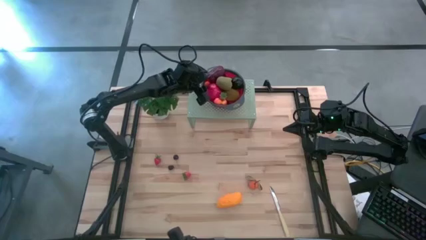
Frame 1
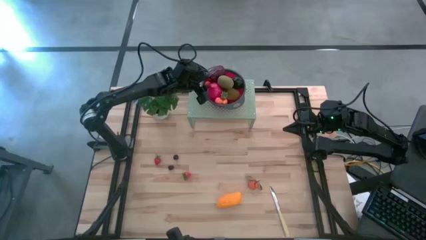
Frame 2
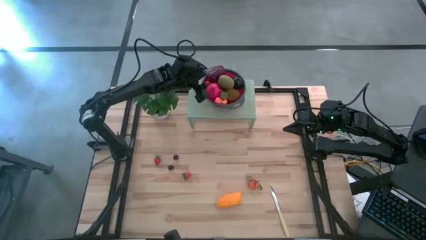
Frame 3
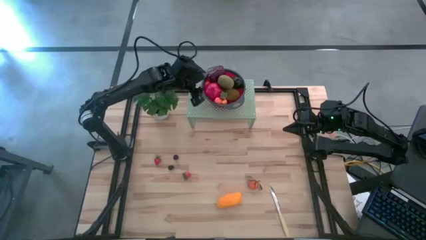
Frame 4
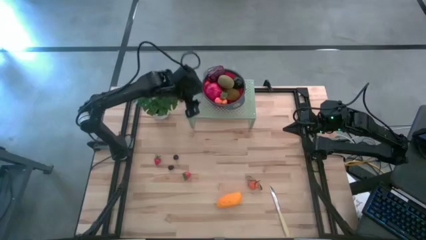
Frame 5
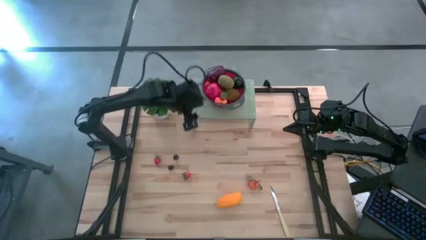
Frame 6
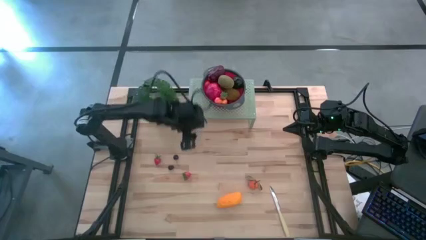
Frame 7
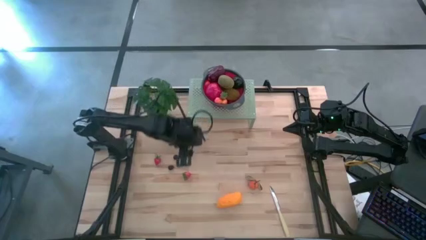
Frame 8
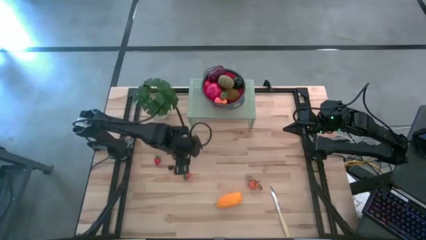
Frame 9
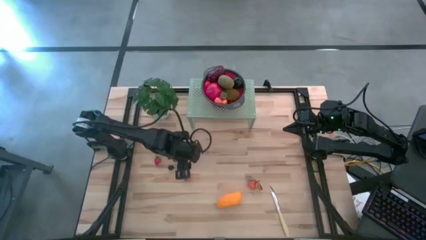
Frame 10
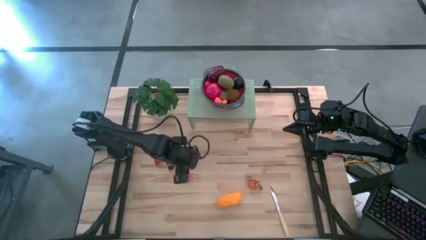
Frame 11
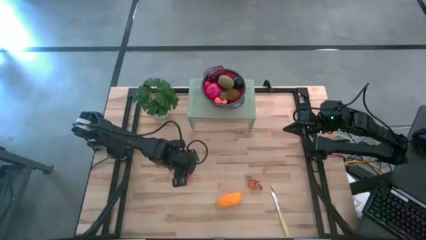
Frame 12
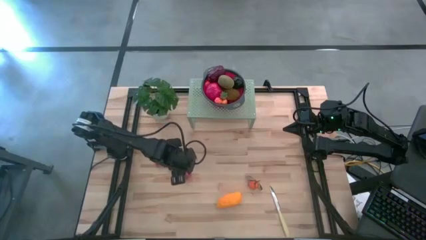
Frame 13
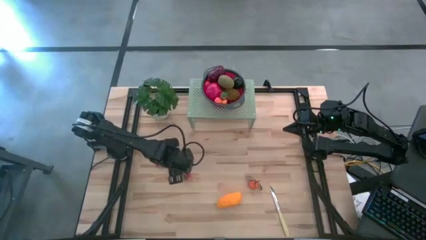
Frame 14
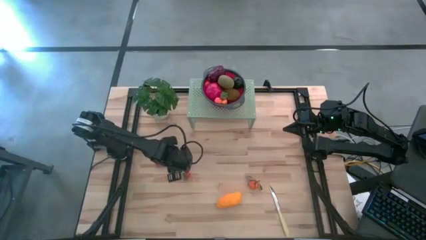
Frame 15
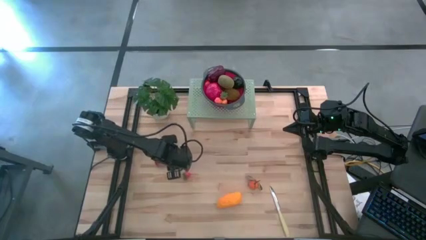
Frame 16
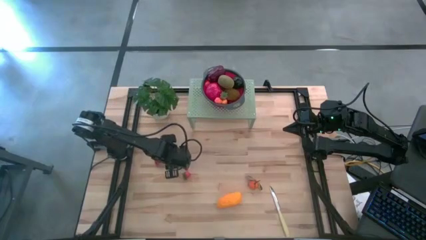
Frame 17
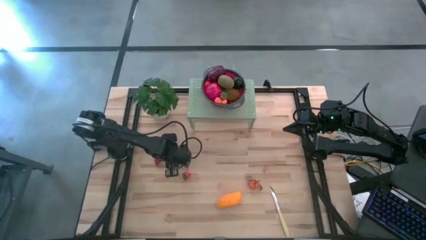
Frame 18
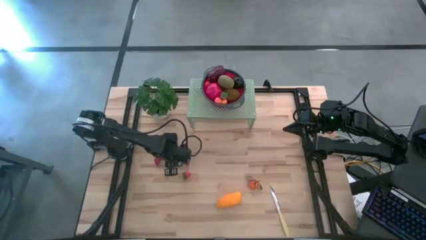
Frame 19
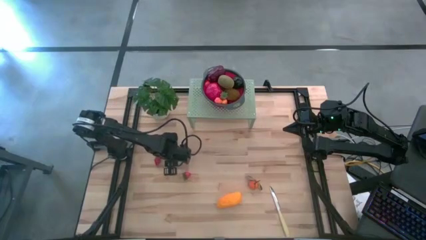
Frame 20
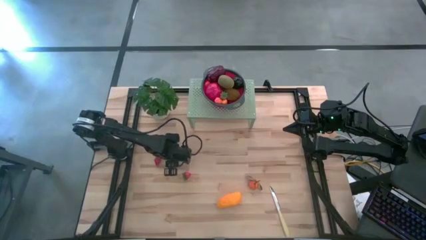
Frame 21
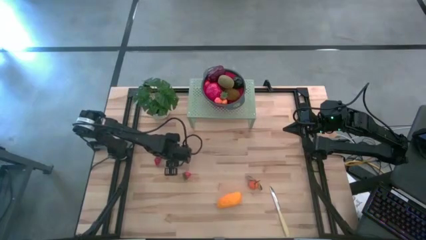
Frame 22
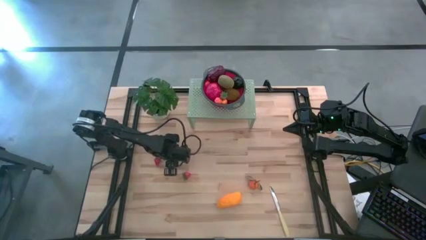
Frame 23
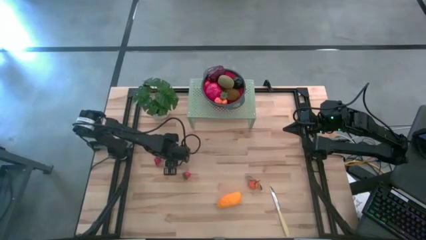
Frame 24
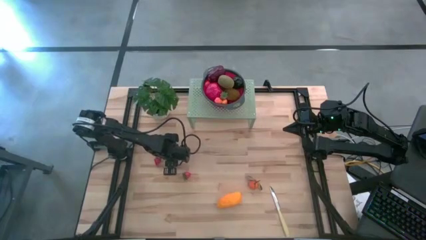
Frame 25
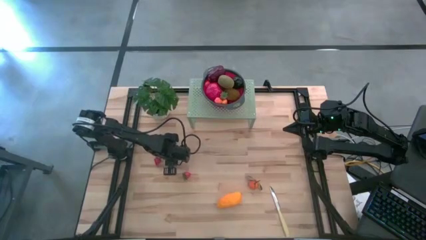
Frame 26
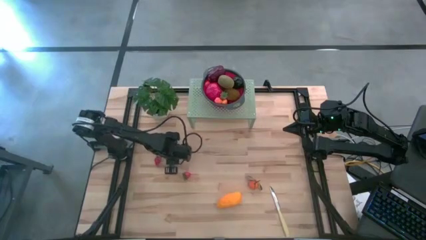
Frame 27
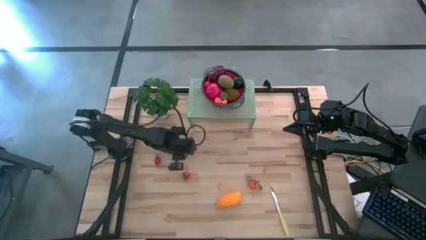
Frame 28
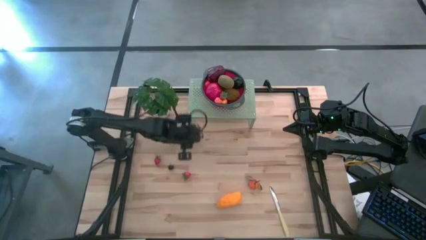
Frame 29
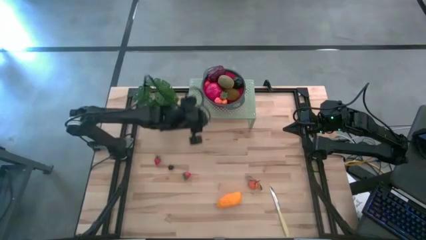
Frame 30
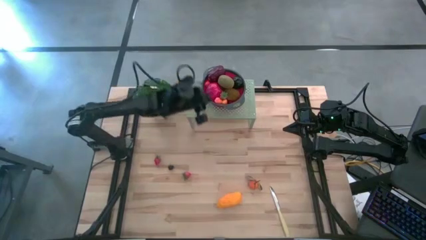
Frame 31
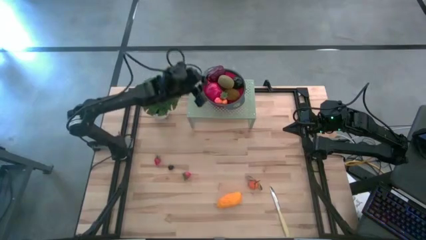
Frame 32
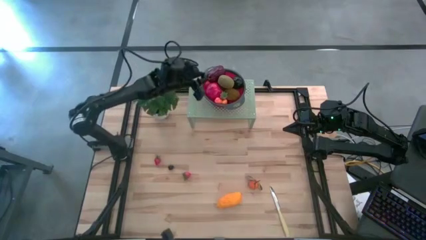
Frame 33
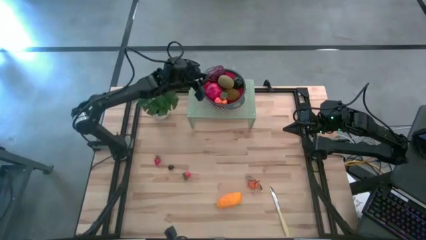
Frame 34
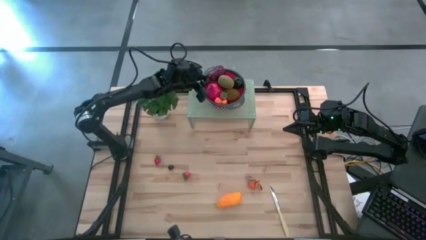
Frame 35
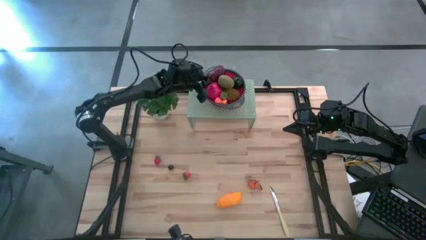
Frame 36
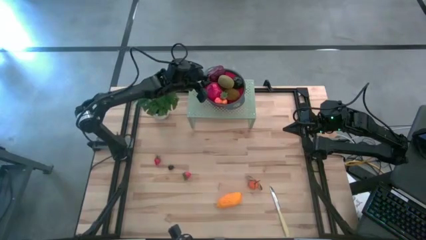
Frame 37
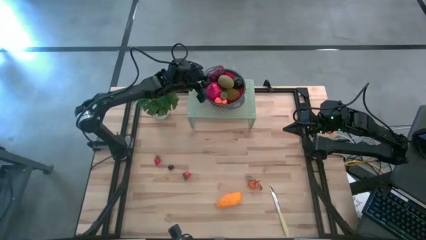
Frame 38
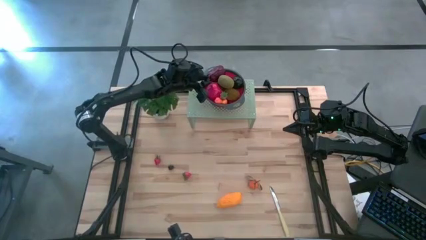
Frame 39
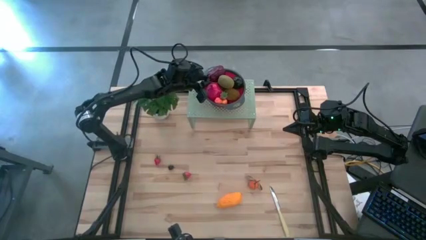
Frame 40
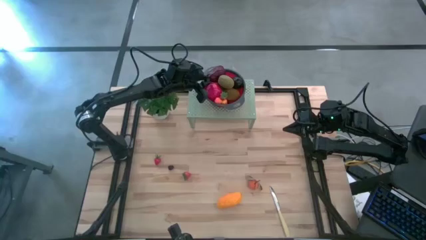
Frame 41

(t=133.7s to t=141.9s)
Task: Pick & Place Fruit
Put the black cherry into the red strainer bowl on the shelf

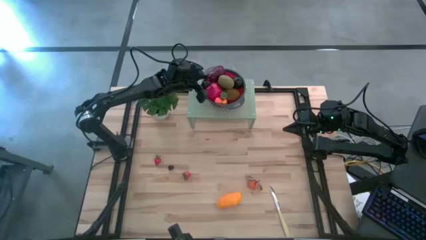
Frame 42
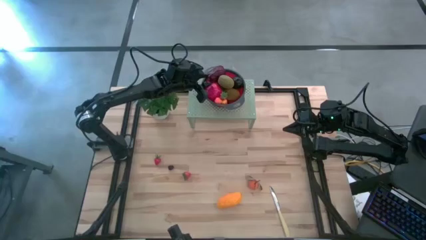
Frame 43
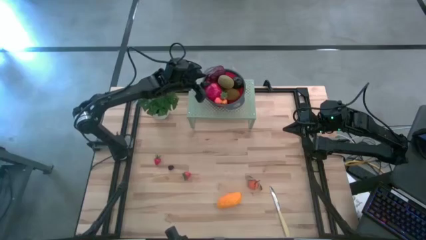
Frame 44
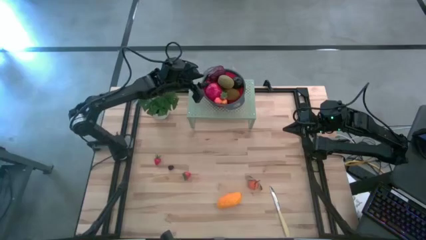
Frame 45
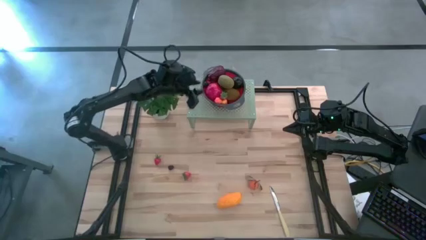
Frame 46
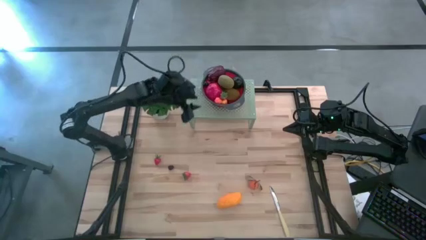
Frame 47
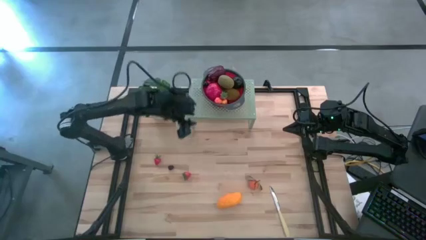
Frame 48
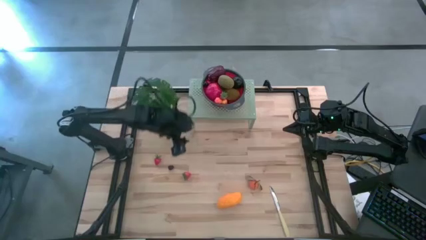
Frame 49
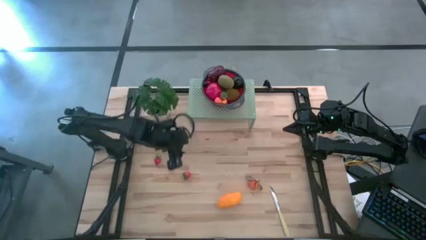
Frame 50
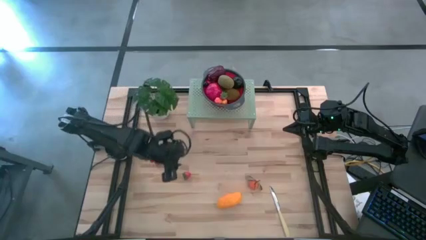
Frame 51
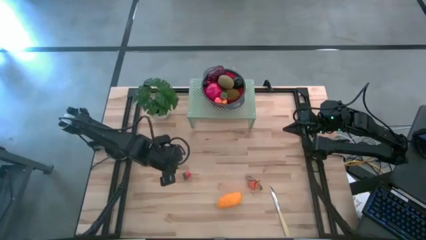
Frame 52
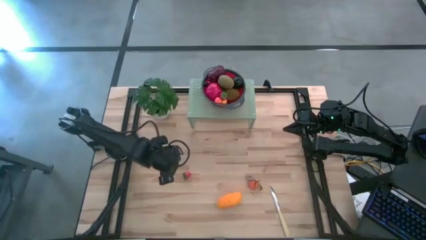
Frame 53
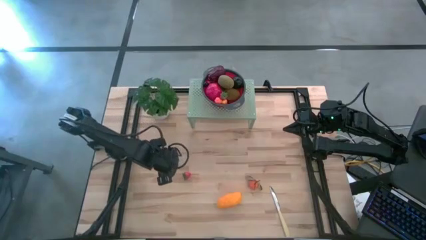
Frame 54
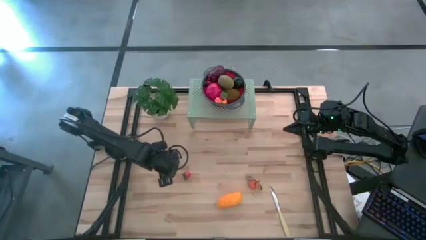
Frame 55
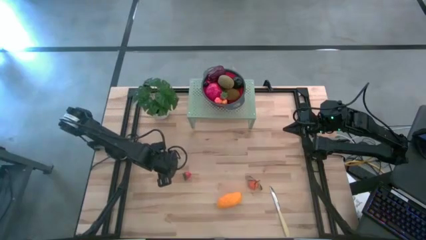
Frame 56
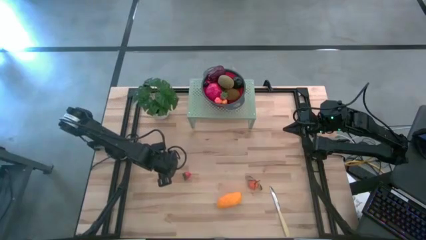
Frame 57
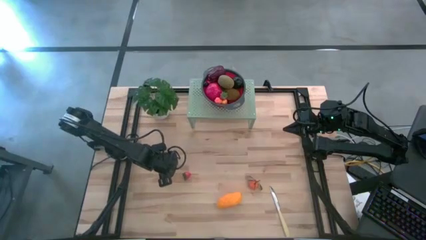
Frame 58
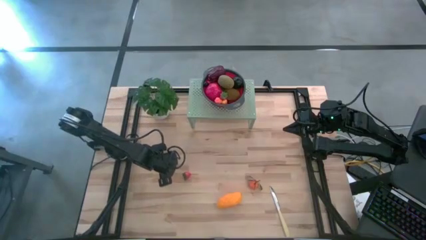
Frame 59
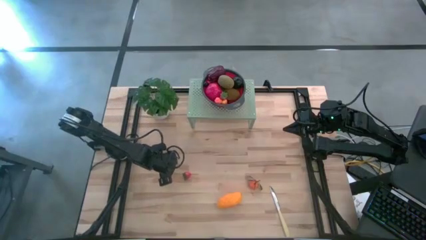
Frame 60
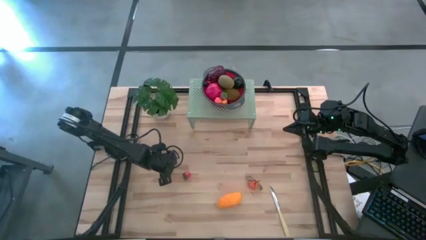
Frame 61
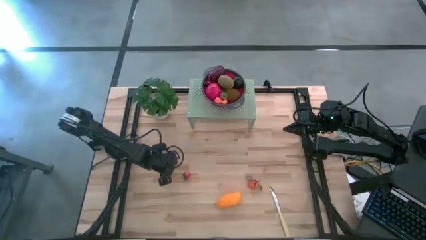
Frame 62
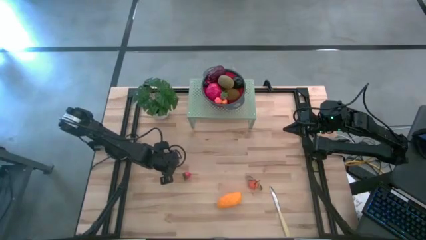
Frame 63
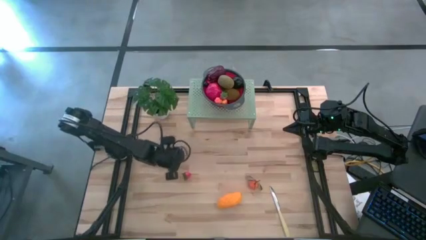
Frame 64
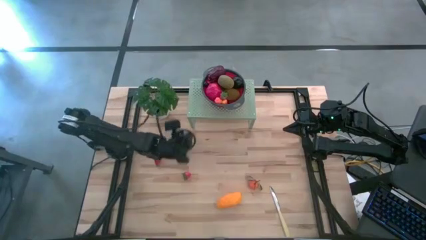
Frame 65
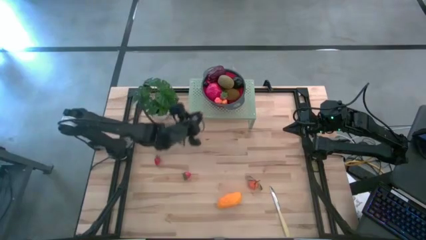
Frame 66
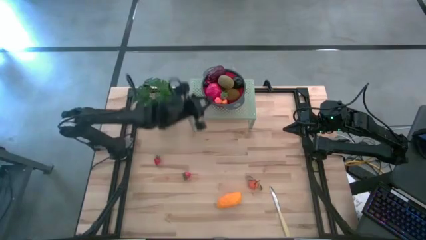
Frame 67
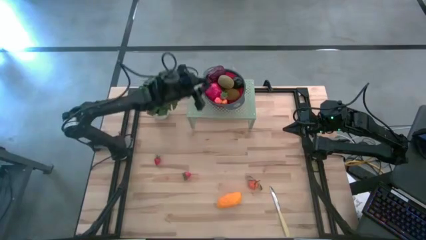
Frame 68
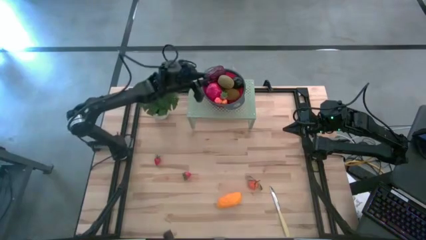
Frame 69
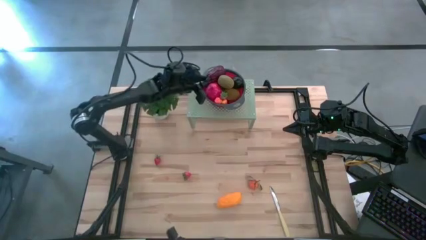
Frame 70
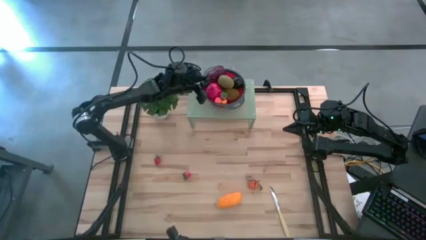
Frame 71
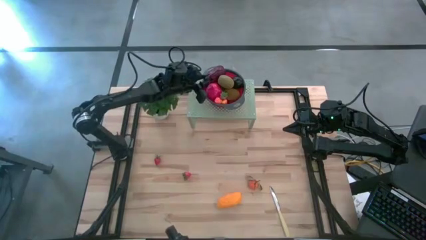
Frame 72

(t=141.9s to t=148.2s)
Put the black berry into the red strainer bowl on the shelf

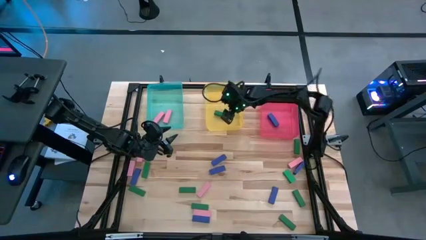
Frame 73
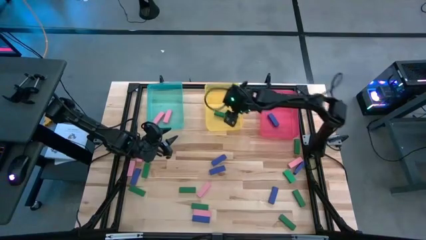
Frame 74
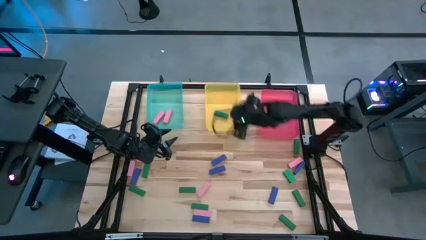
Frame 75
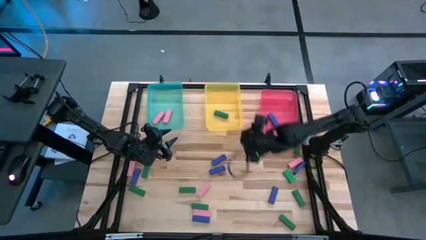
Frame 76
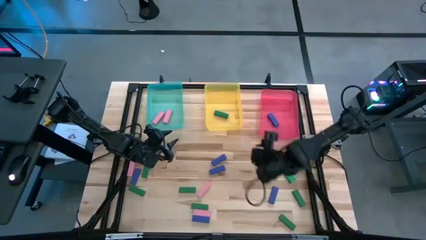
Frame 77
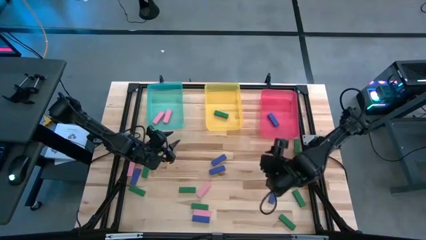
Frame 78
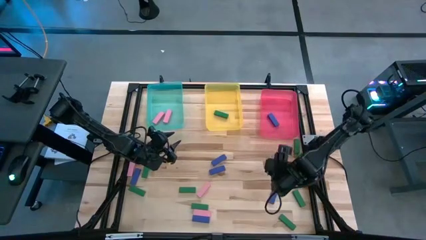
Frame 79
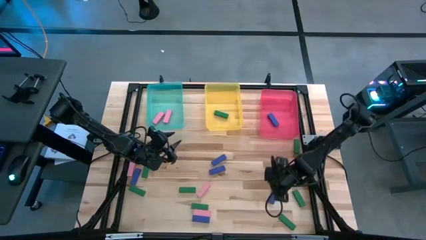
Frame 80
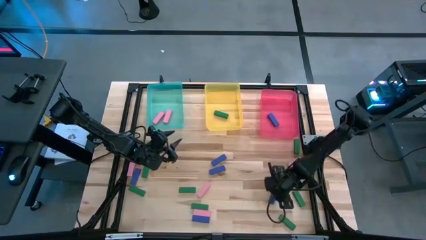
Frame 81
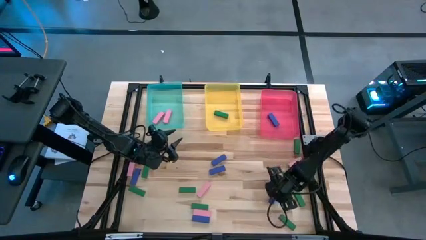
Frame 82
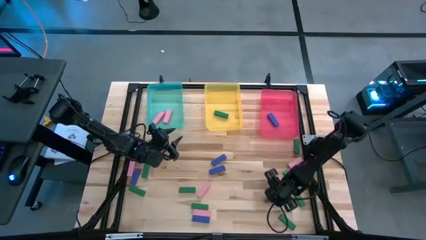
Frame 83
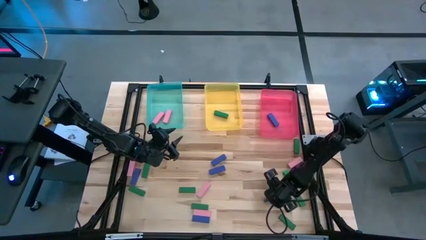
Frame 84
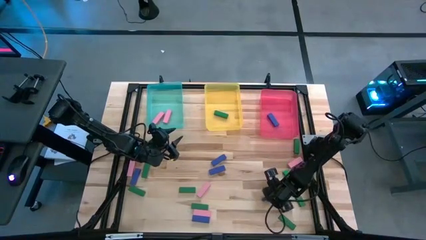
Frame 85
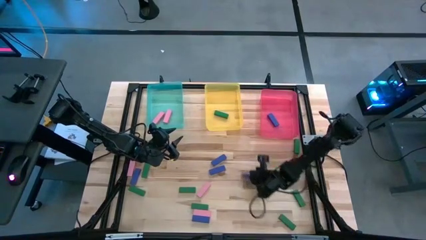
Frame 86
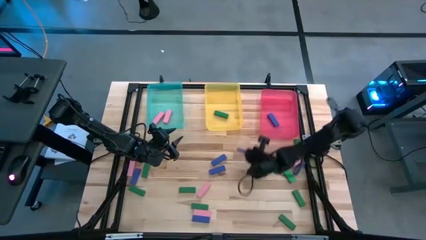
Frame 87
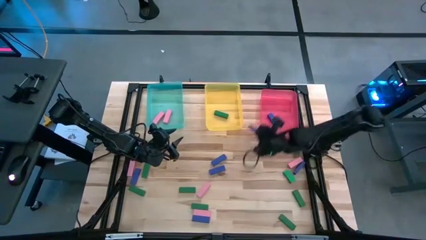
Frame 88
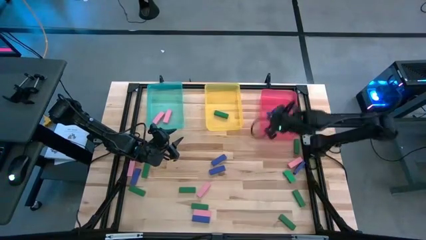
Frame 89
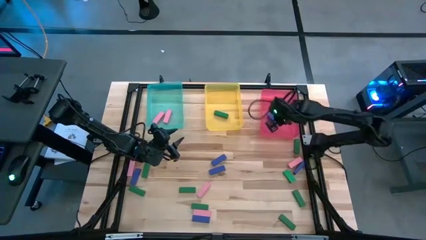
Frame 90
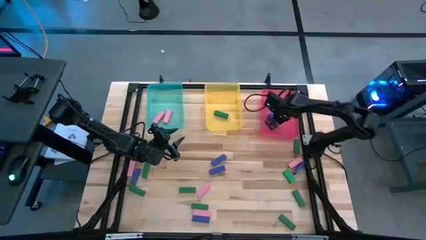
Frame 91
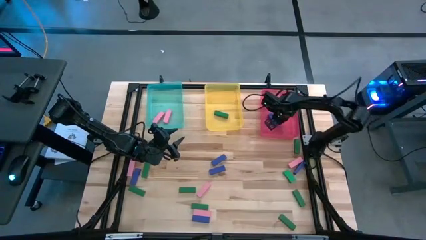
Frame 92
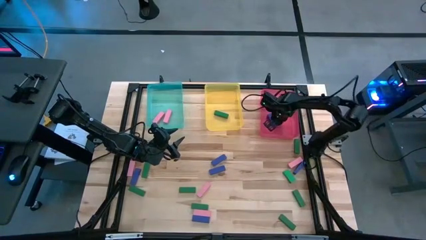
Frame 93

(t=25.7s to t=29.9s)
Task: Sort blocks
Put the blue wooden block into the red bin
